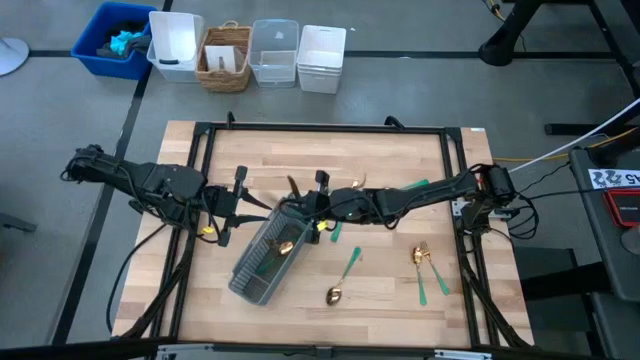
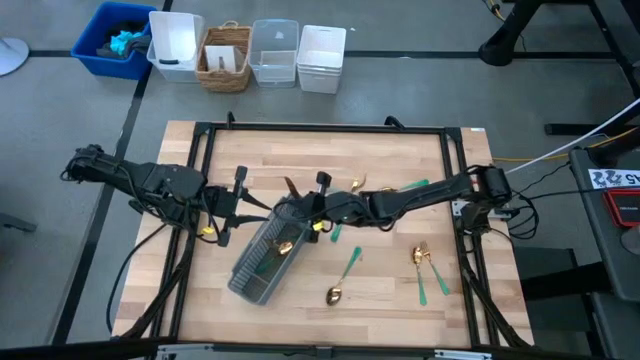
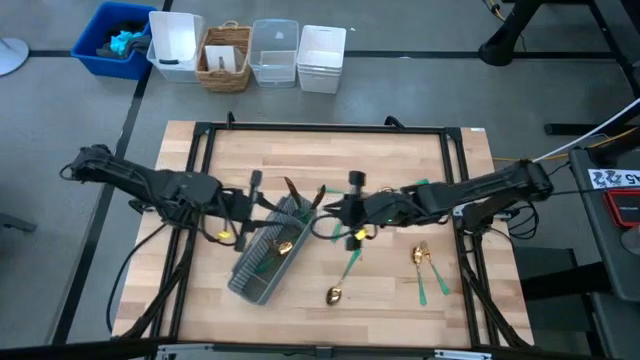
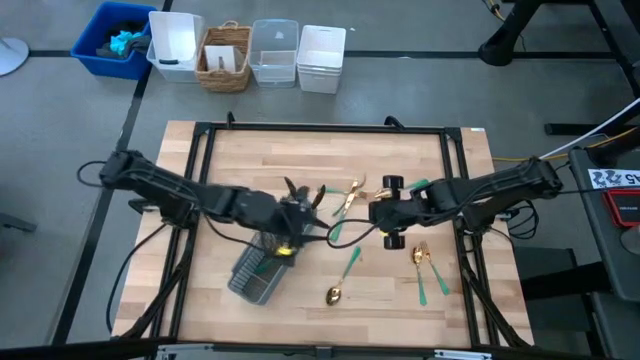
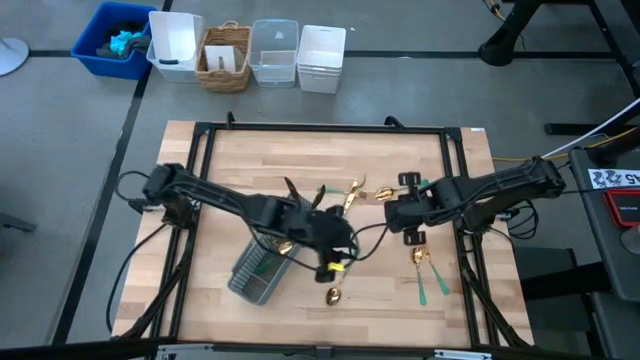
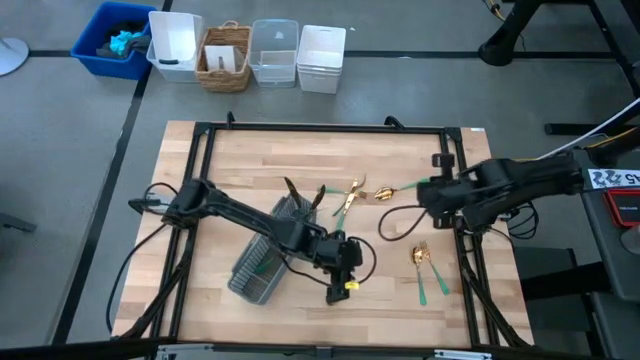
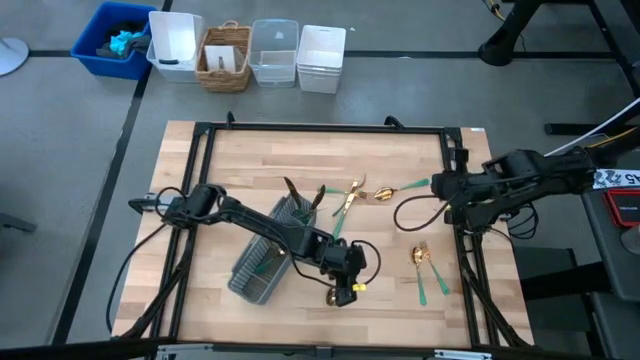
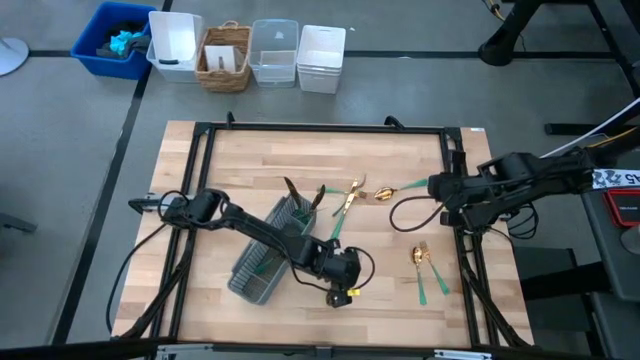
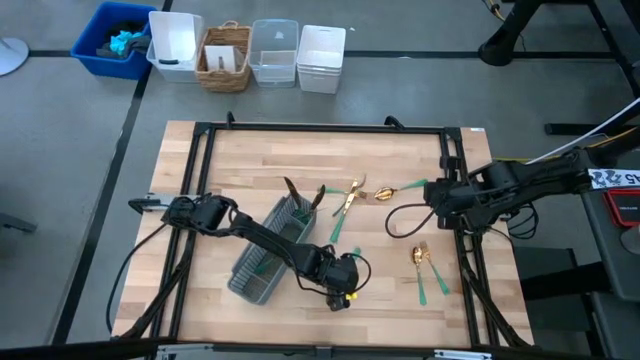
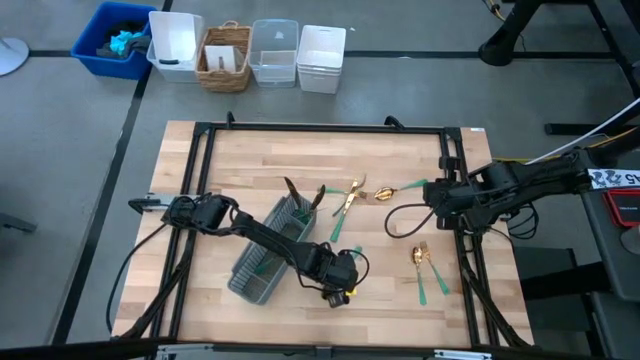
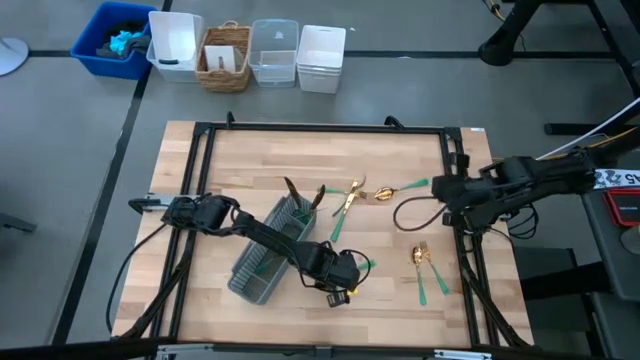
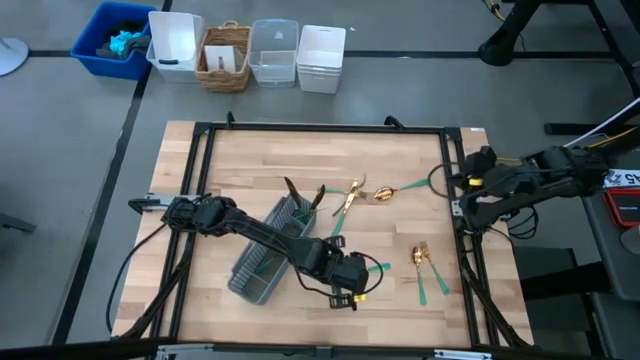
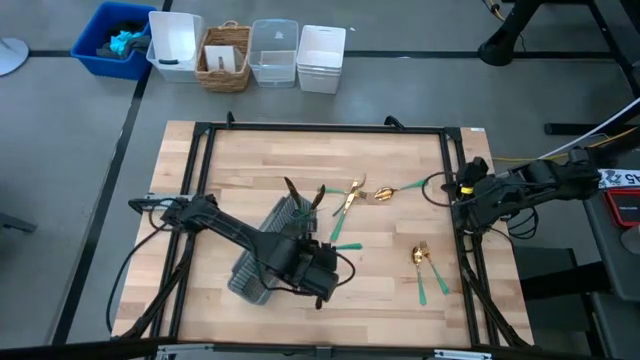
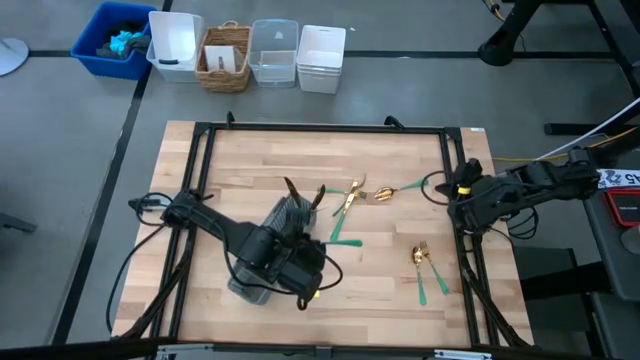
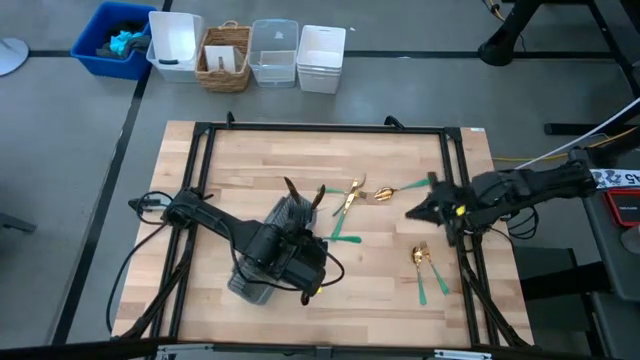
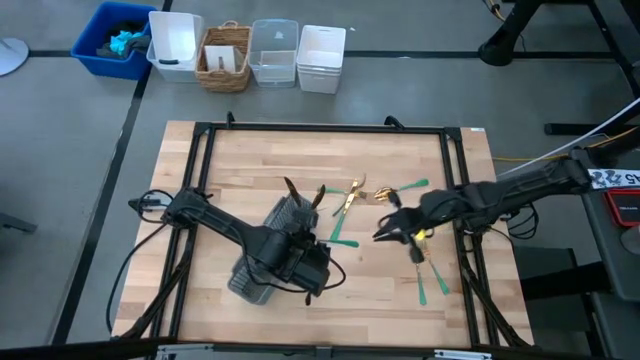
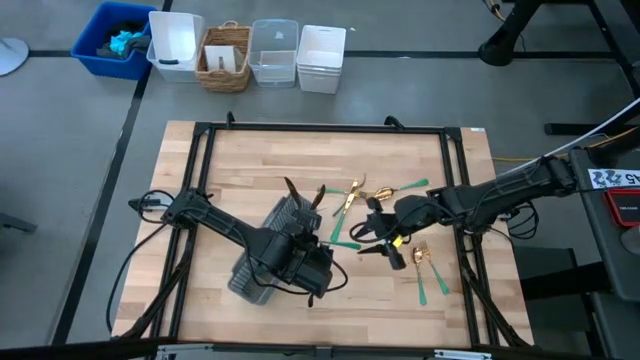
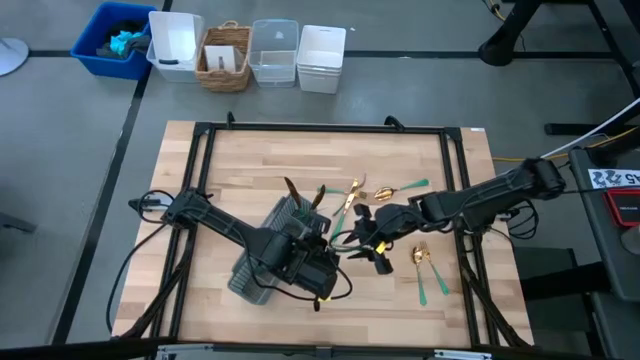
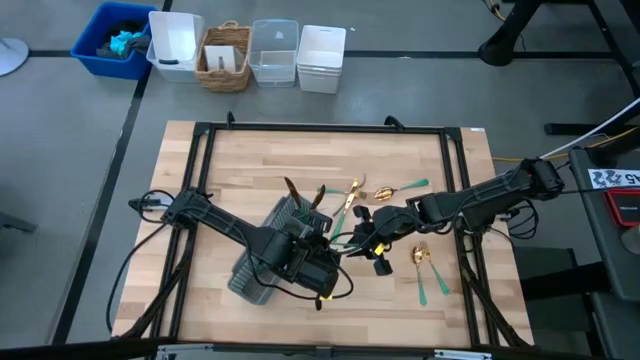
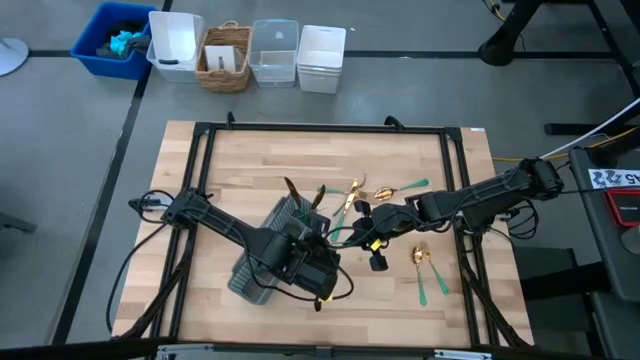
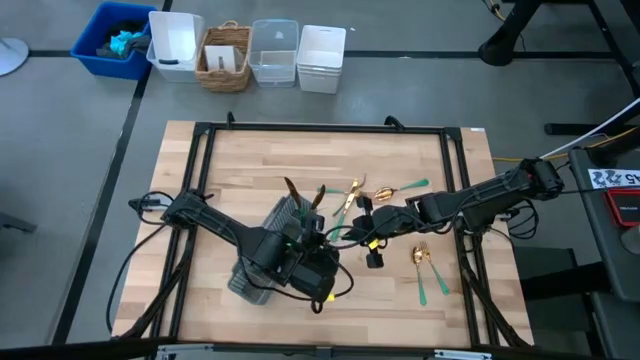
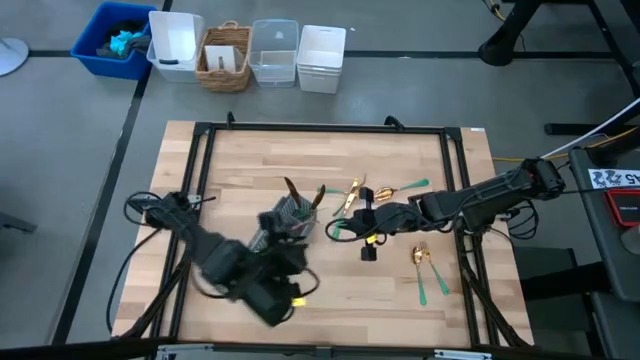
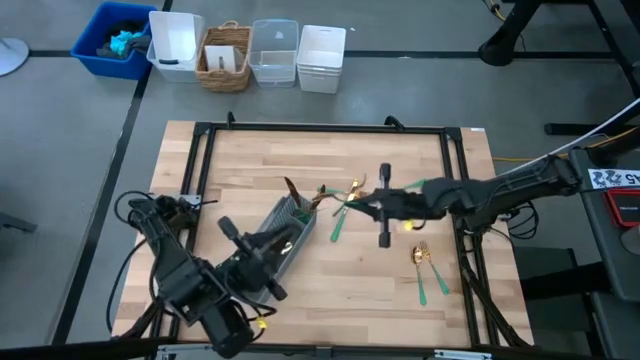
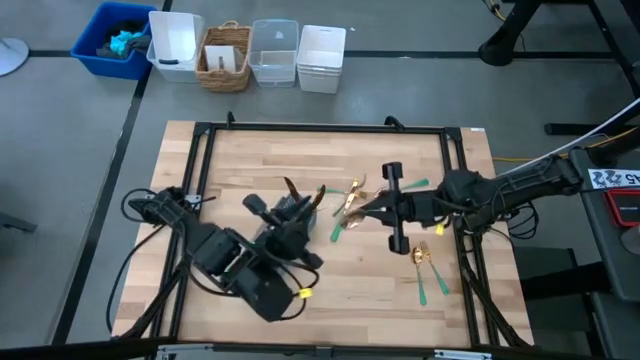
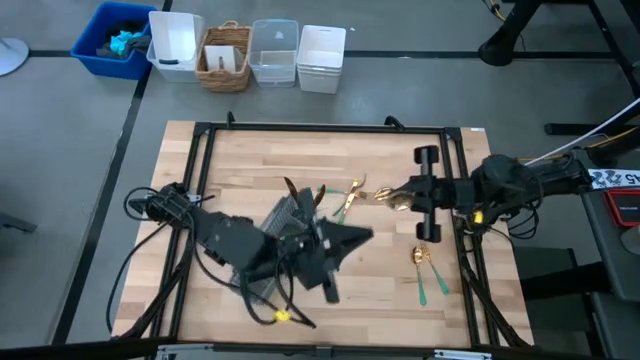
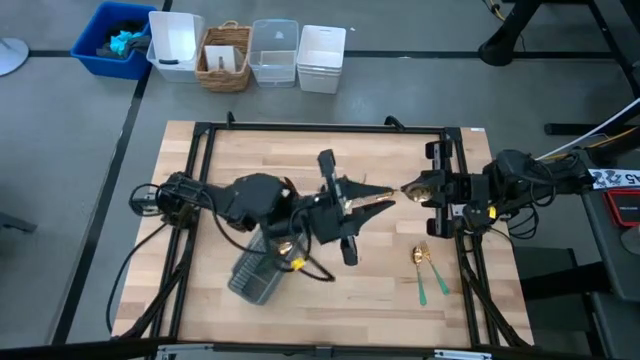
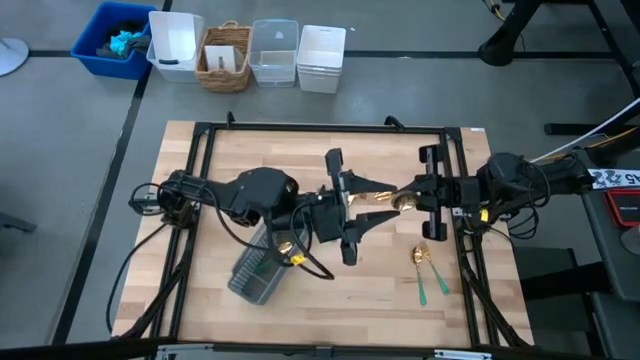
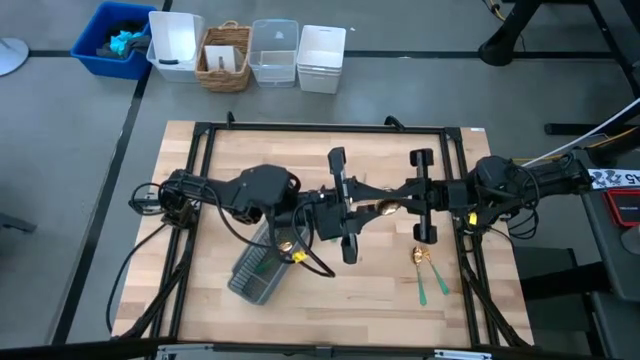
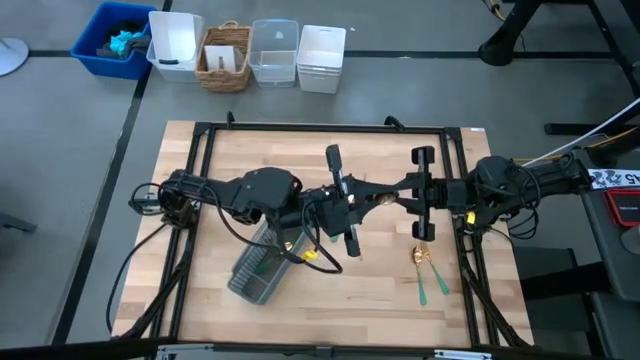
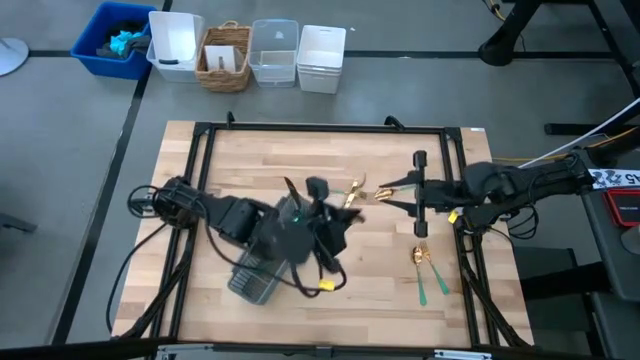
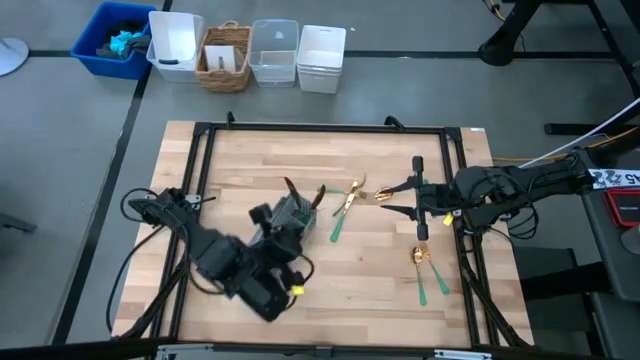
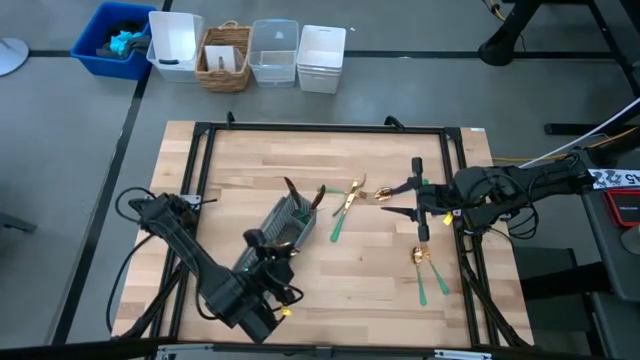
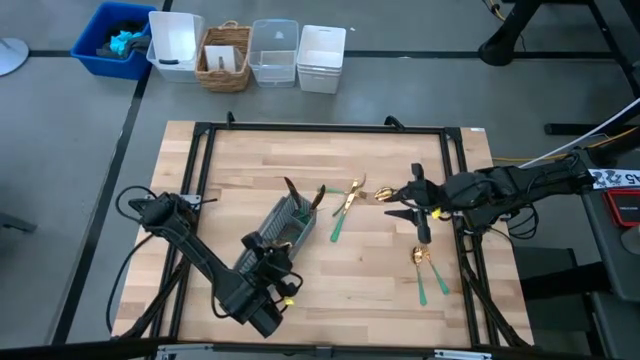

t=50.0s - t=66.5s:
Task: Sort silverware
Put the green spoon into the silverware basket

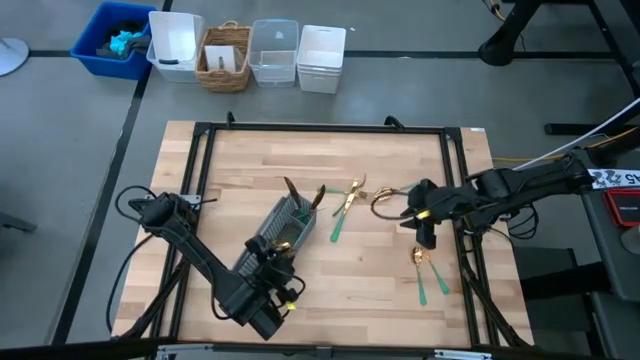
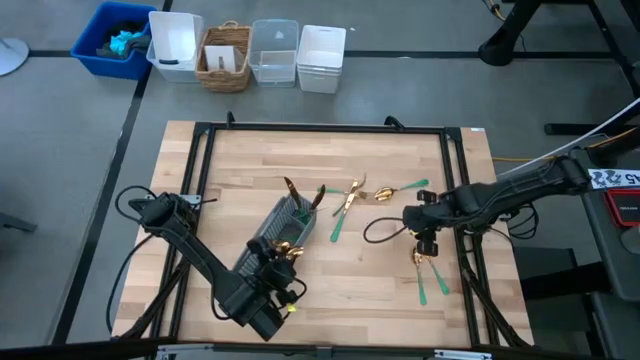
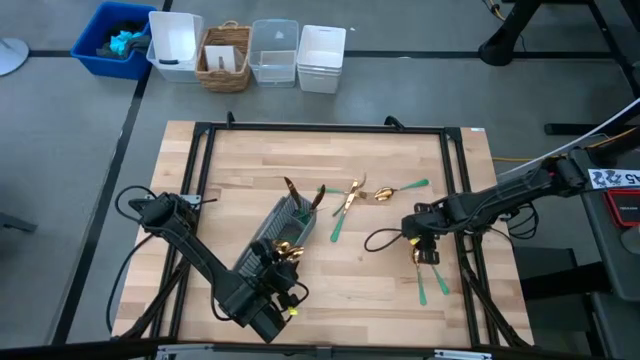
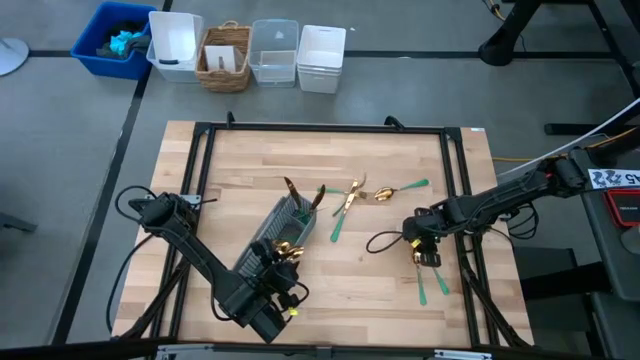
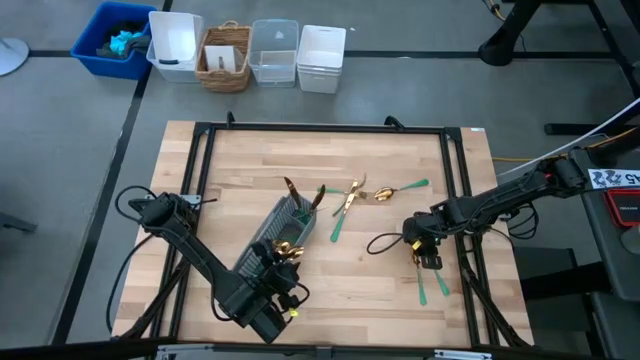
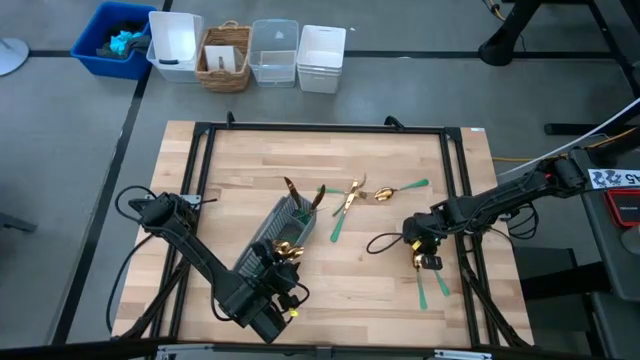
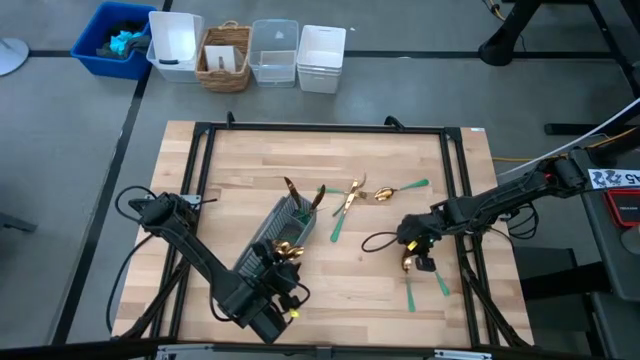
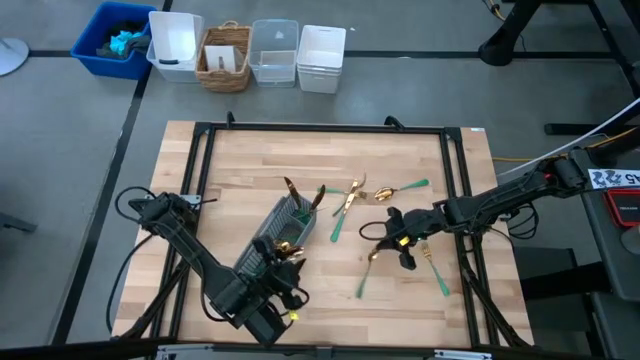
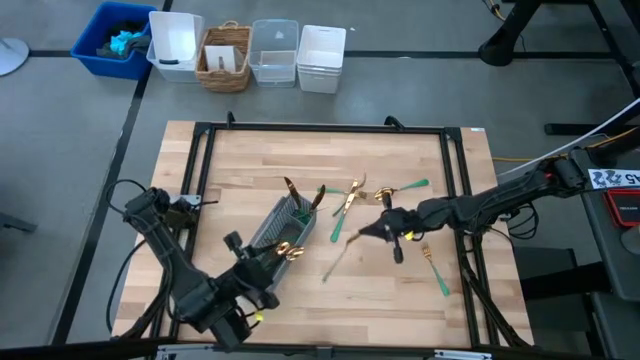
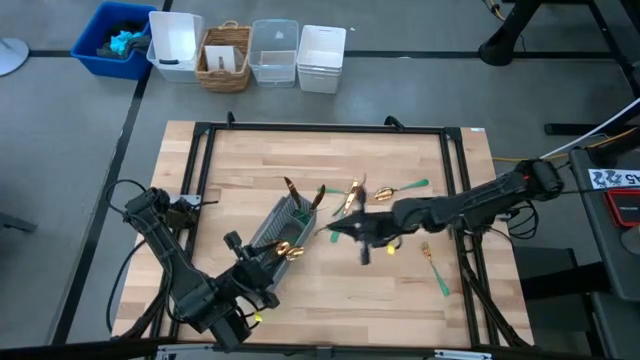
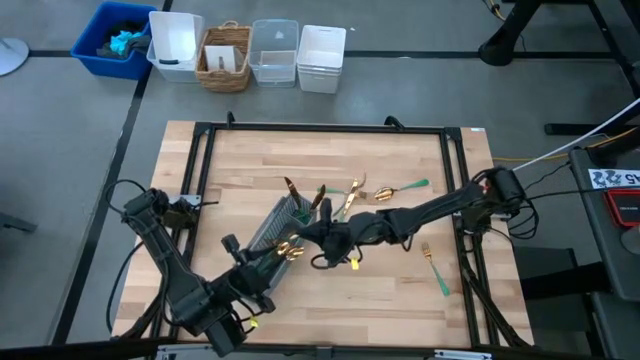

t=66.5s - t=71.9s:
Put the green spoon into the silverware basket
